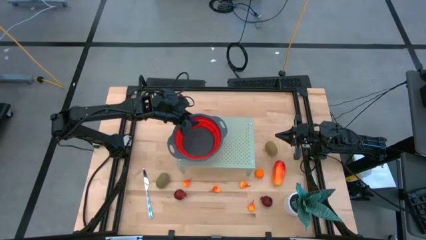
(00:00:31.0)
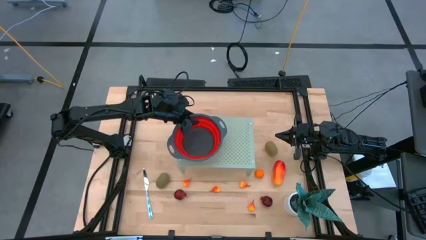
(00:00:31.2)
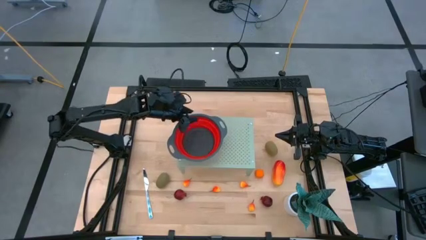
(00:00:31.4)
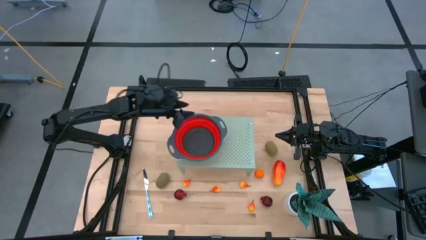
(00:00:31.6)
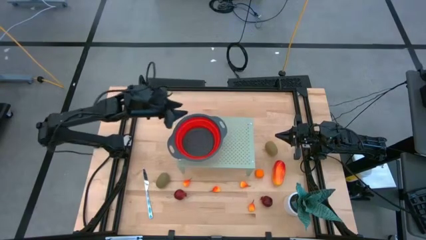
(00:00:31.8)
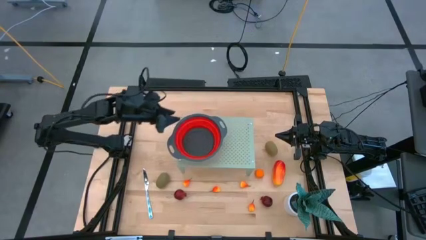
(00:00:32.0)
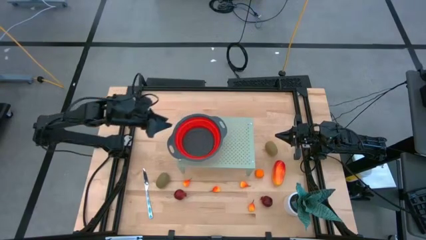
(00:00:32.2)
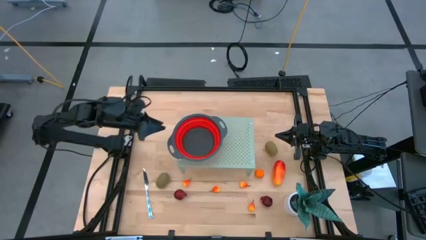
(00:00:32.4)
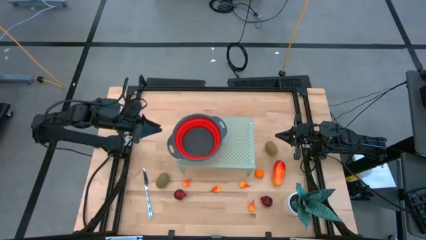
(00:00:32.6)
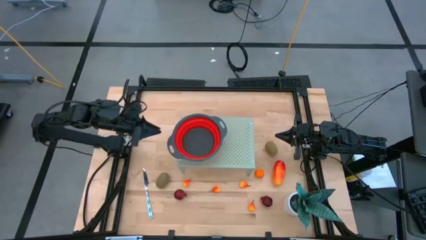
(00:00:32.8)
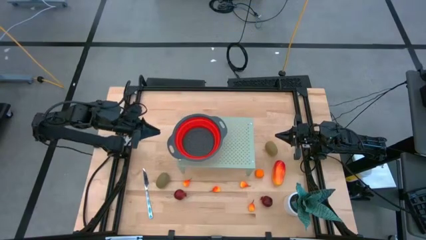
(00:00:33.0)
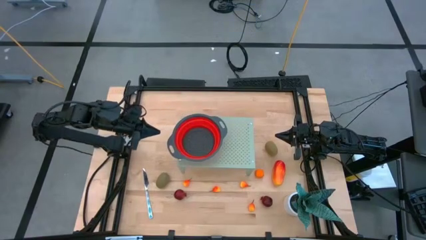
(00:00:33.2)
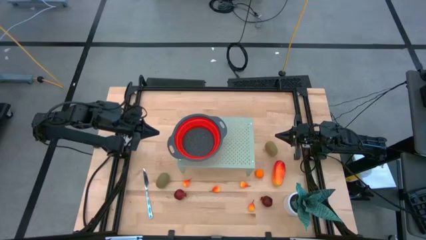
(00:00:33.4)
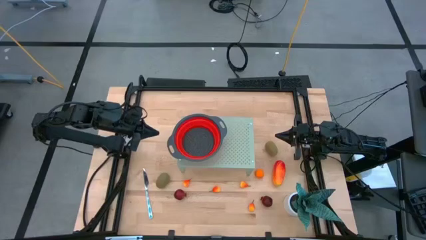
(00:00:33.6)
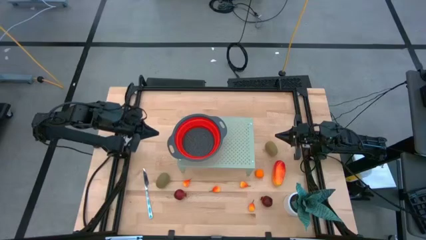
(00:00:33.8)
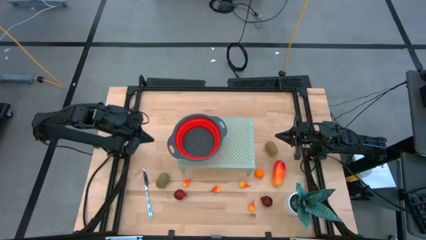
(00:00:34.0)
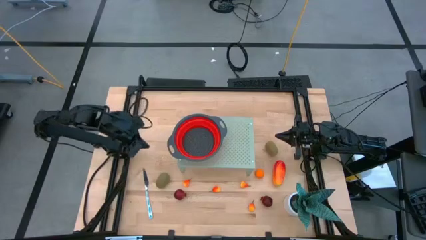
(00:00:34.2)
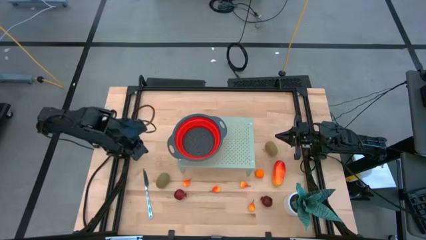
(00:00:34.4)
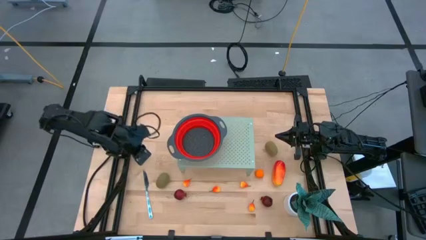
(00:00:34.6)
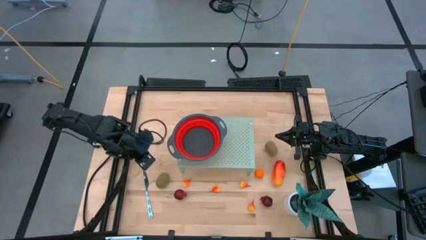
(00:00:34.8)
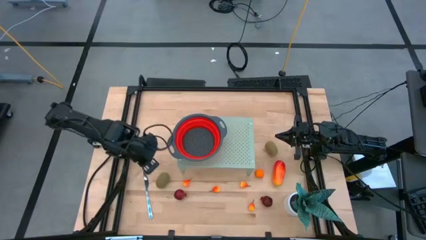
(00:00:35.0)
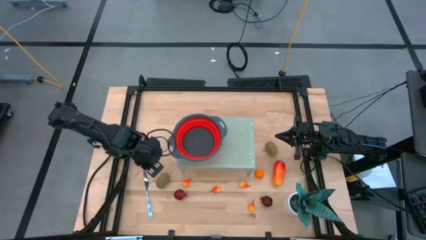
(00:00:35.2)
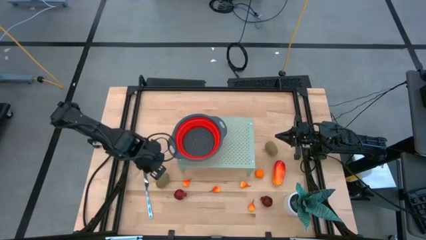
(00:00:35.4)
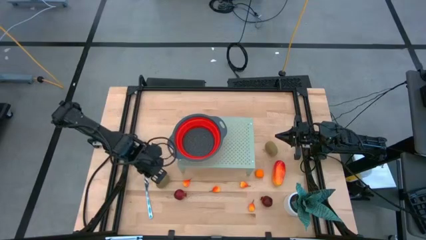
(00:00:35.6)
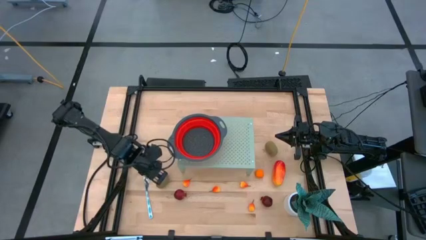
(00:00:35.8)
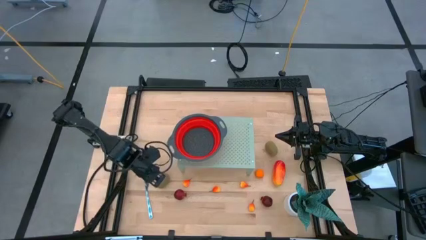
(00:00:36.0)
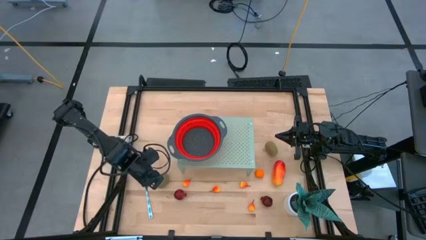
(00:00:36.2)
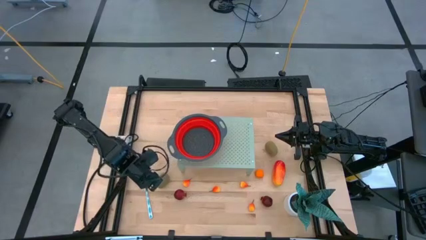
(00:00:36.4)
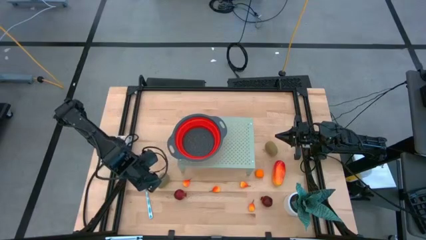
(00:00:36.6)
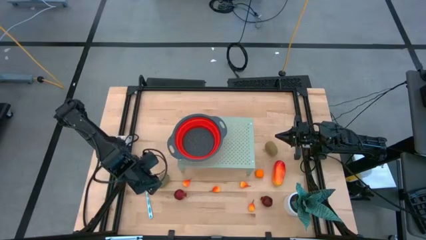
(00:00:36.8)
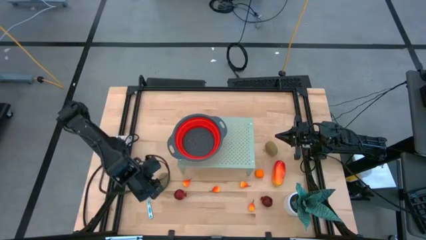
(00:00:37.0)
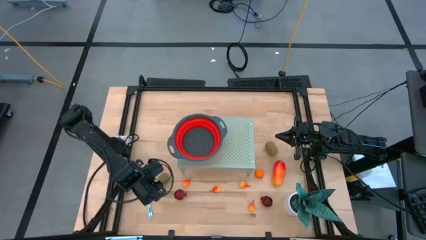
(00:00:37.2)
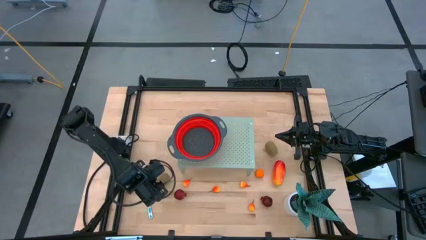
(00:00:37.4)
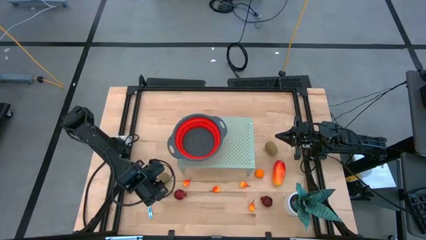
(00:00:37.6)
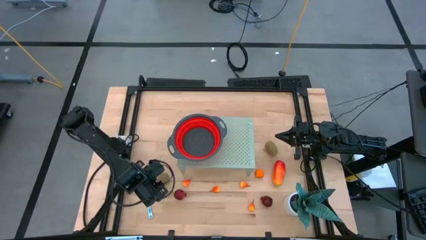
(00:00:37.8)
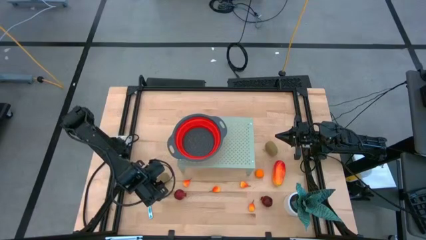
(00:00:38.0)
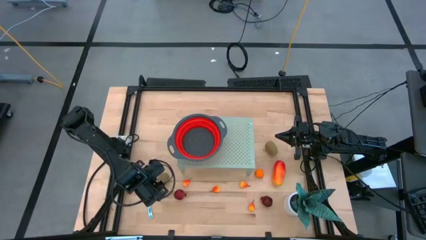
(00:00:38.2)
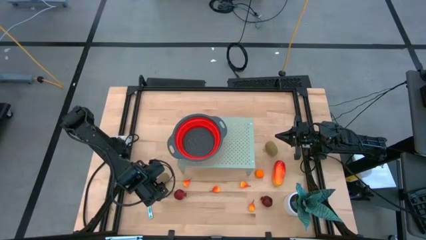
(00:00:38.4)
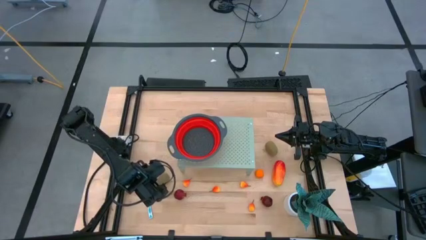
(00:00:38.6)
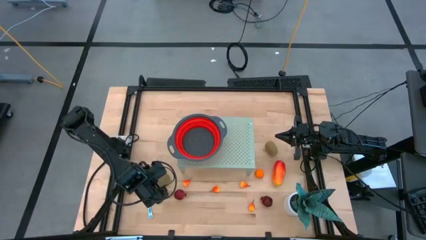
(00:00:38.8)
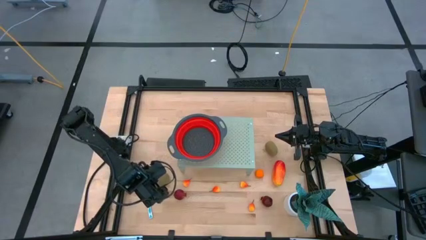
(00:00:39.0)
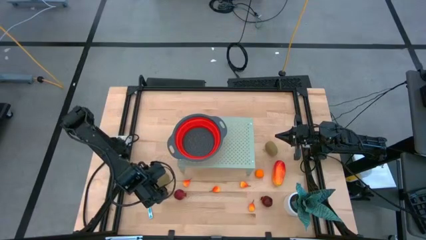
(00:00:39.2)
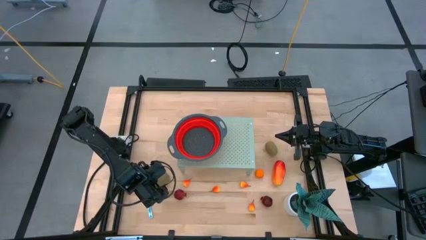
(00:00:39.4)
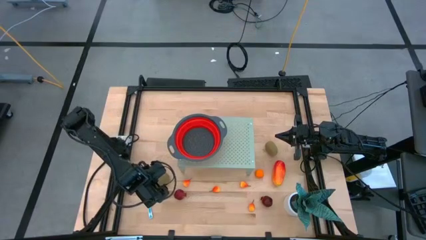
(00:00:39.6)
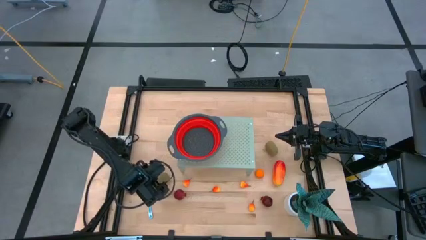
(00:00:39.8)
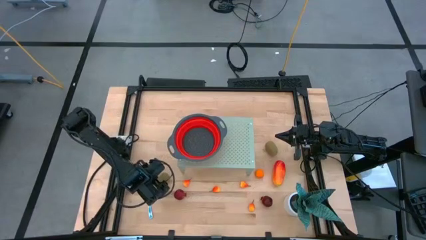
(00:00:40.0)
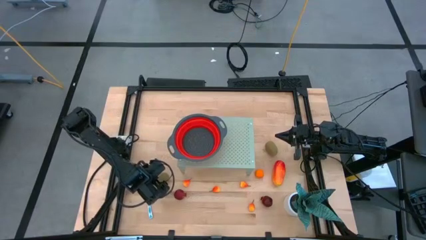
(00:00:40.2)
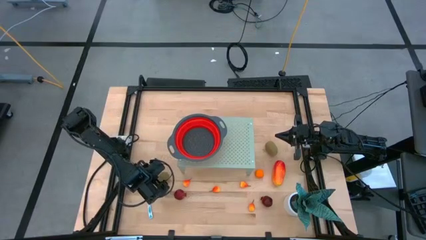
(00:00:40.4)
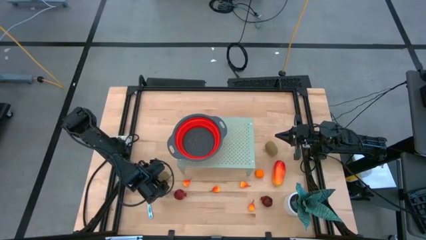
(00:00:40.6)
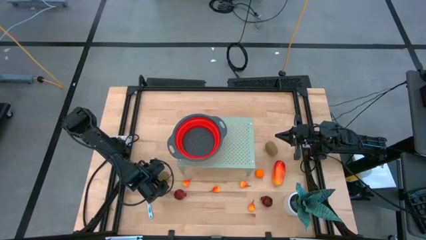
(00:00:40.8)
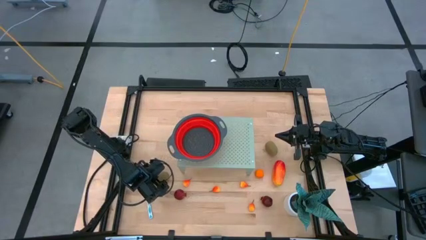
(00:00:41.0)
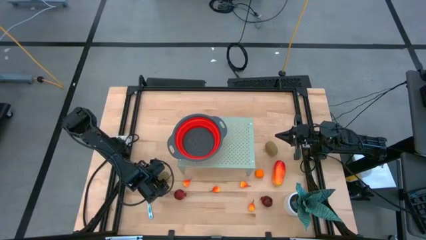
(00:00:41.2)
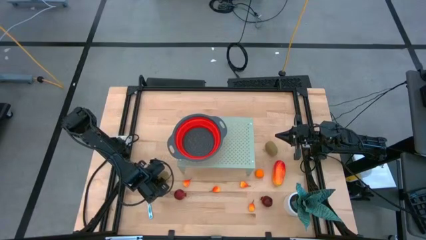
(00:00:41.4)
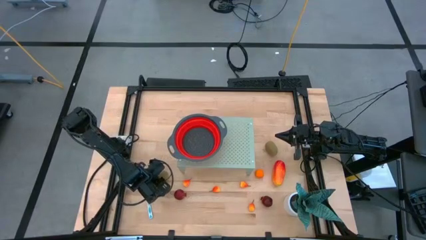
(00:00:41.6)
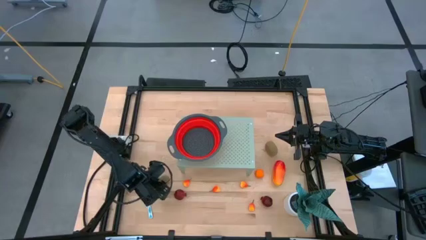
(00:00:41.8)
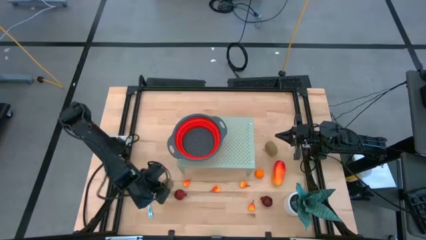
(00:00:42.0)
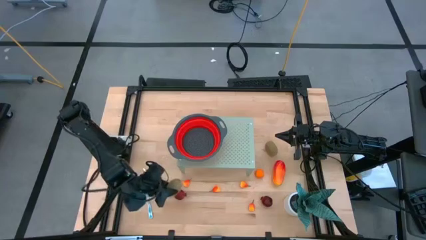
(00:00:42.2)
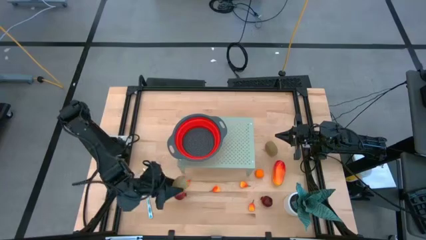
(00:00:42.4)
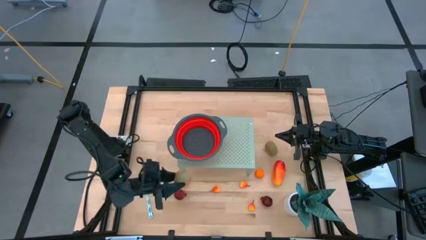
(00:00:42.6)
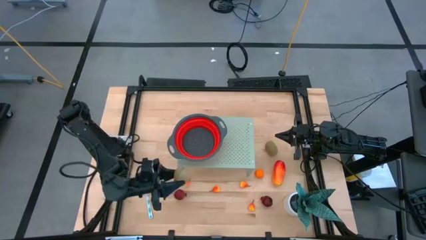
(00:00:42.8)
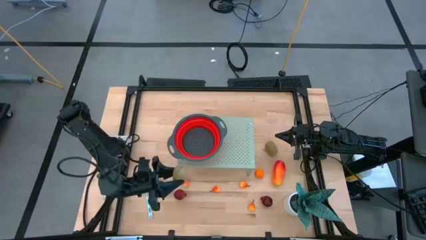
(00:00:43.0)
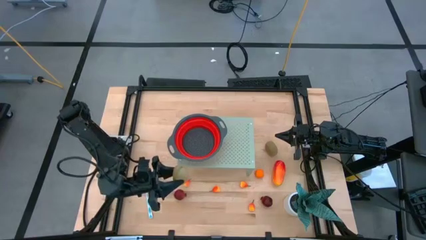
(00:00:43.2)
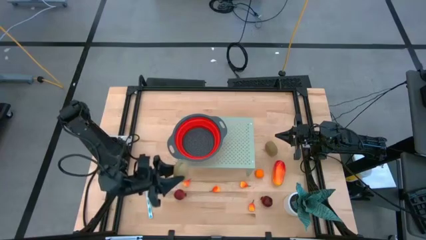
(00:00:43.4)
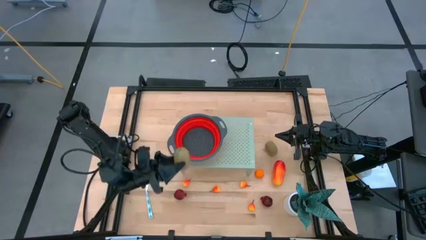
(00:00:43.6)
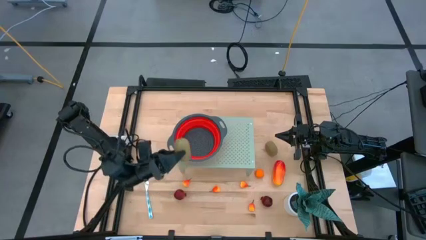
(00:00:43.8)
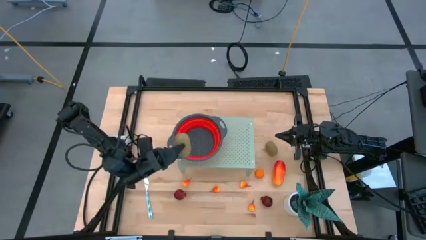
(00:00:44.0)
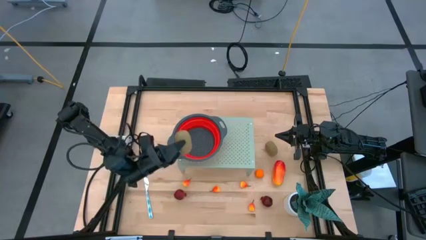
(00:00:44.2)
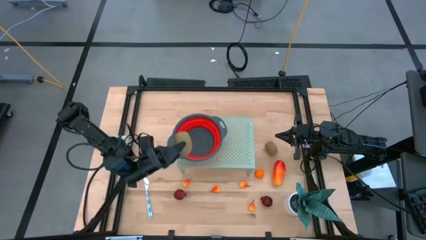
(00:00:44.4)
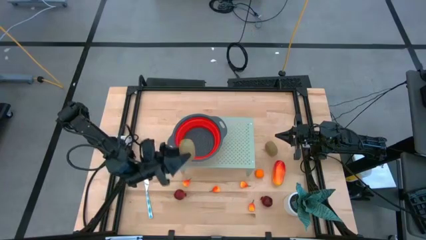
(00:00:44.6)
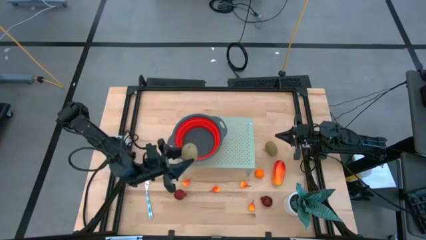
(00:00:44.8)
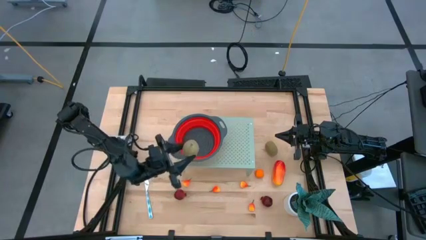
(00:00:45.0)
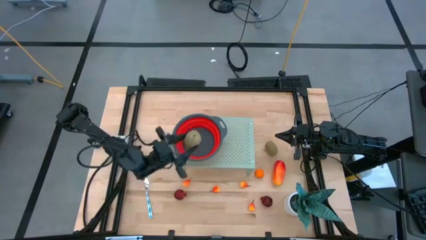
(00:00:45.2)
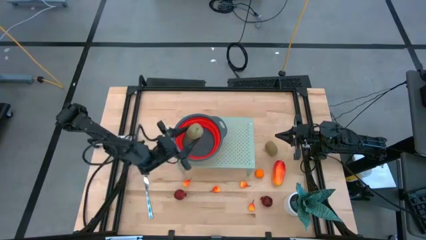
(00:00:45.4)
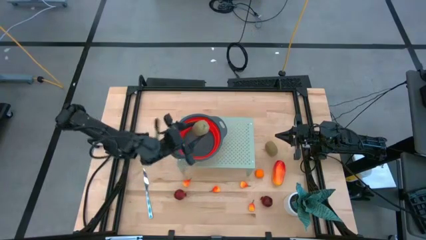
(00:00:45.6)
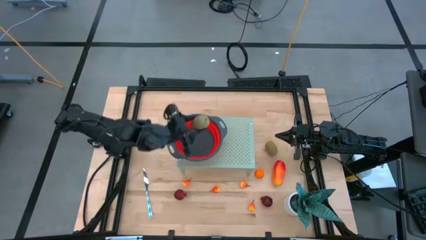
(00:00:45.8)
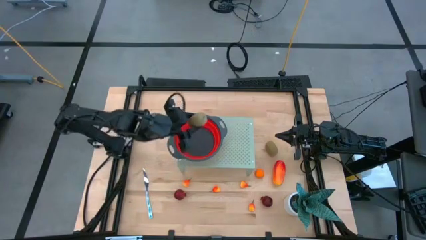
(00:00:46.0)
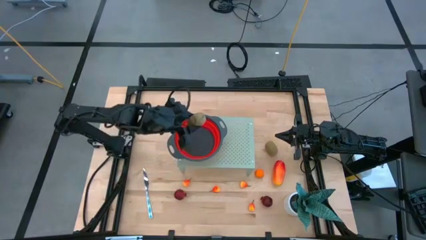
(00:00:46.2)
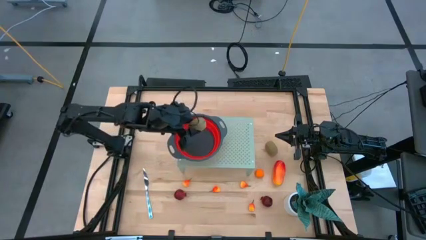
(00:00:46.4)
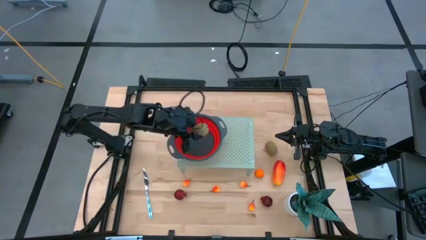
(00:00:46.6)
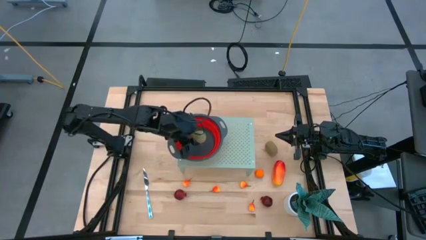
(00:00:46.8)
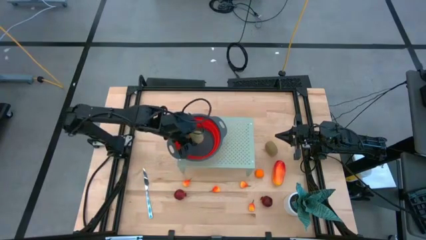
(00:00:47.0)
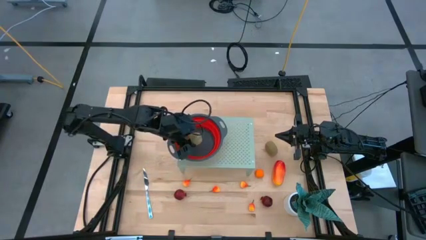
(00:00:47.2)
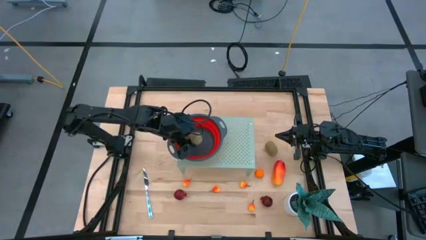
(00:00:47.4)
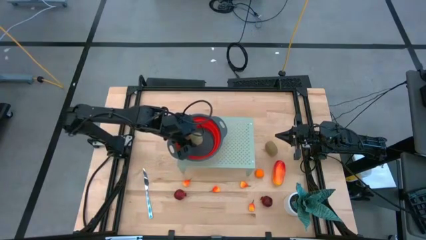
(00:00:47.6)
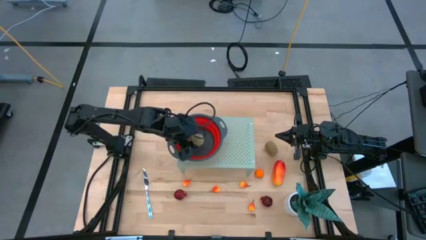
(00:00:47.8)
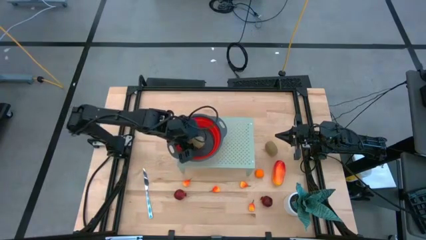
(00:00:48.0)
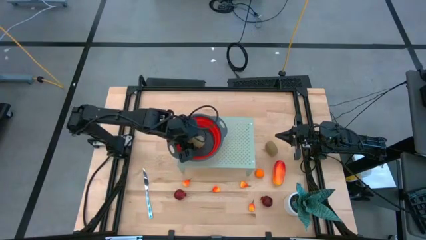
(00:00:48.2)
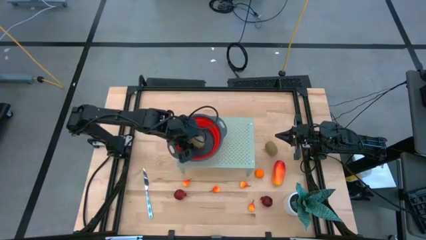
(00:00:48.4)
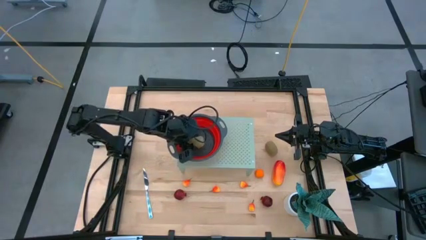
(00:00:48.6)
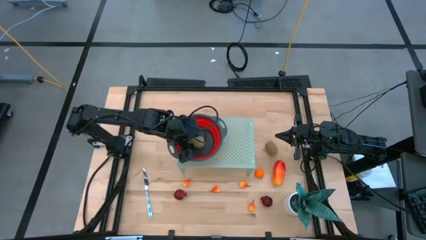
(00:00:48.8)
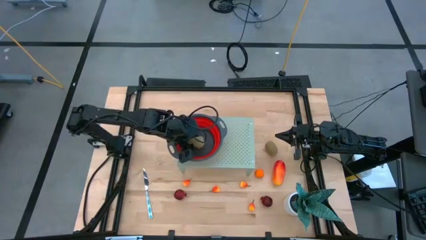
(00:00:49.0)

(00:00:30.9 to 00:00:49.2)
Task: Pick & Place Fruit
Put the kiwi fruit into the strainer
